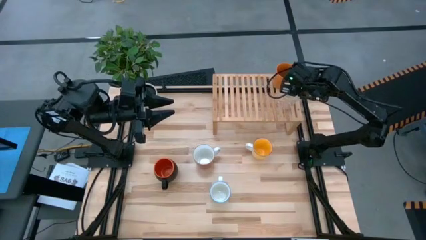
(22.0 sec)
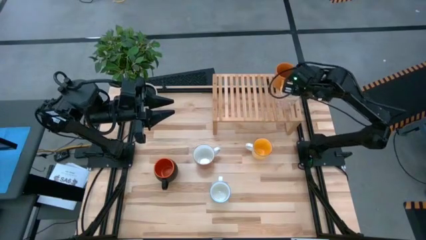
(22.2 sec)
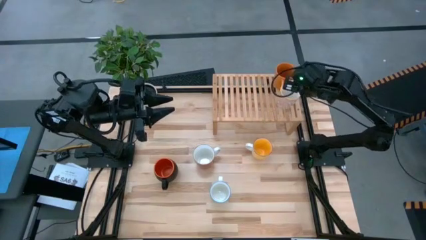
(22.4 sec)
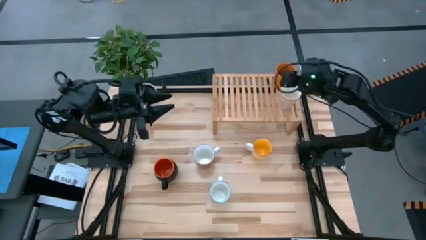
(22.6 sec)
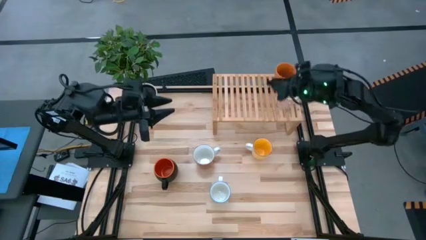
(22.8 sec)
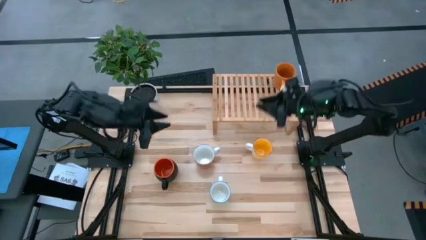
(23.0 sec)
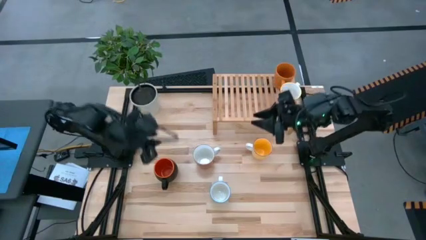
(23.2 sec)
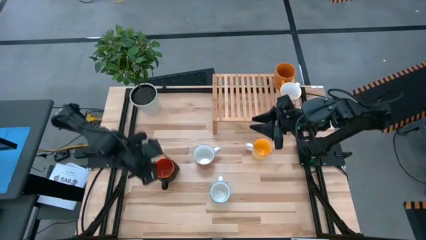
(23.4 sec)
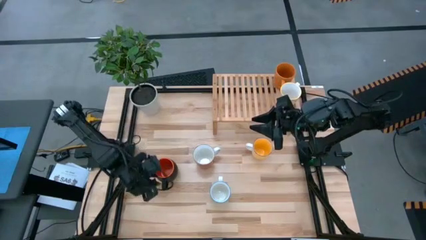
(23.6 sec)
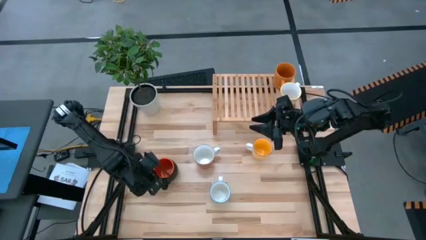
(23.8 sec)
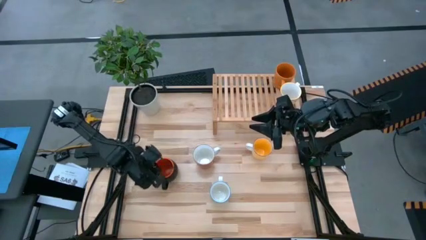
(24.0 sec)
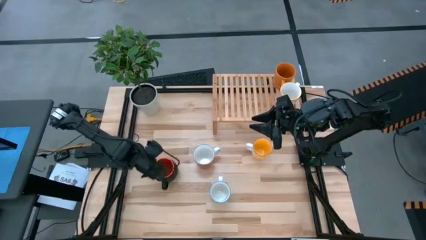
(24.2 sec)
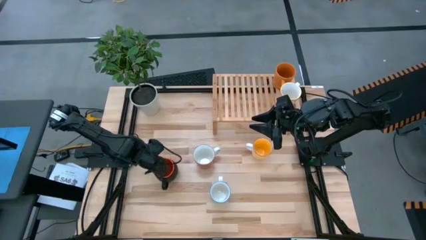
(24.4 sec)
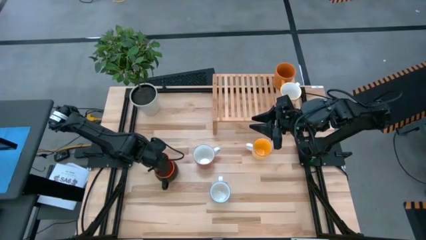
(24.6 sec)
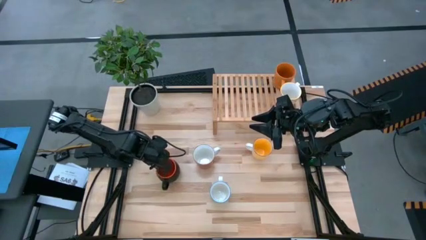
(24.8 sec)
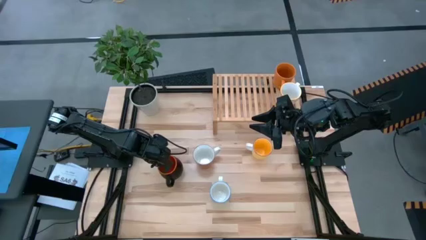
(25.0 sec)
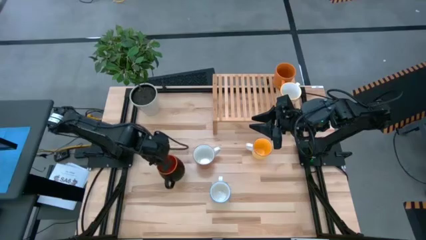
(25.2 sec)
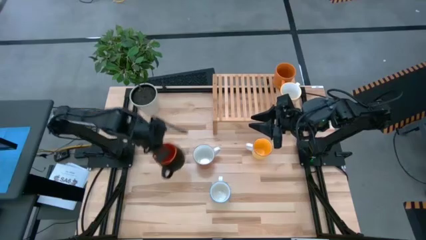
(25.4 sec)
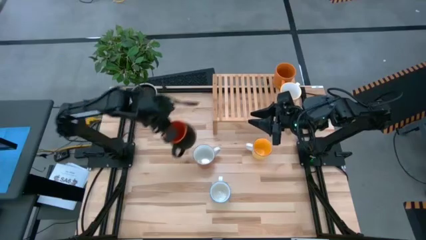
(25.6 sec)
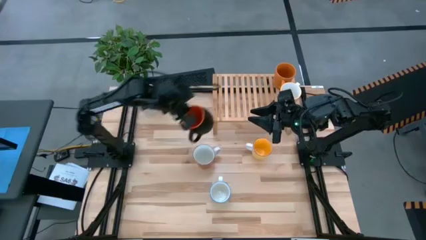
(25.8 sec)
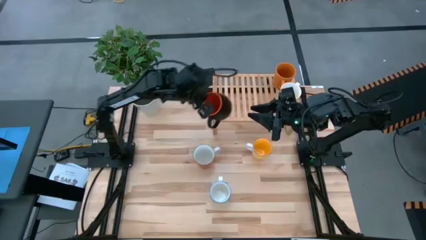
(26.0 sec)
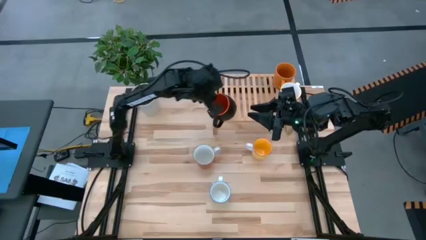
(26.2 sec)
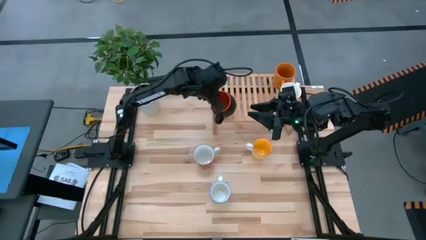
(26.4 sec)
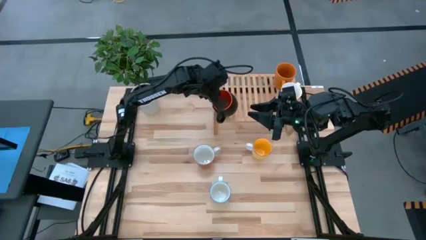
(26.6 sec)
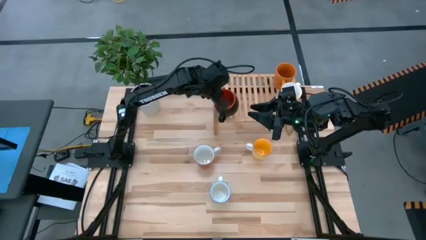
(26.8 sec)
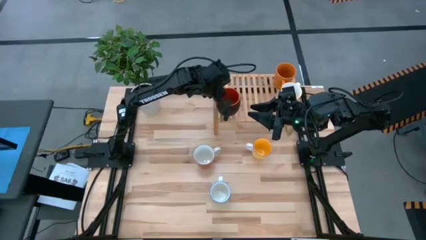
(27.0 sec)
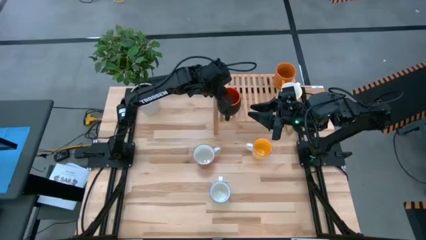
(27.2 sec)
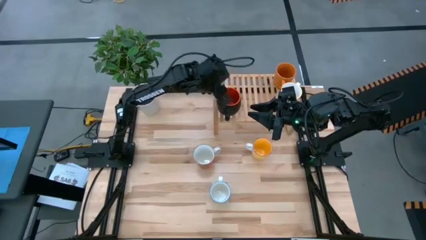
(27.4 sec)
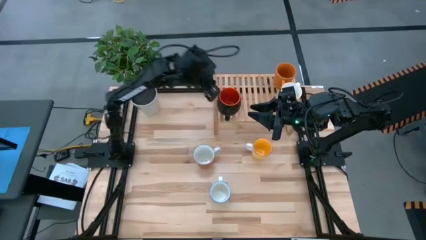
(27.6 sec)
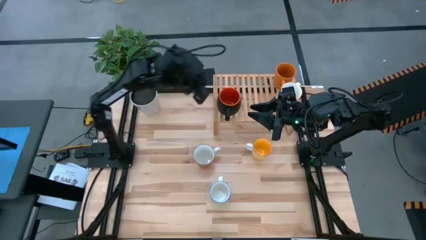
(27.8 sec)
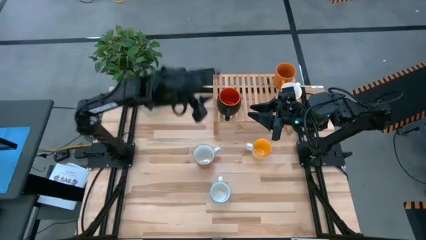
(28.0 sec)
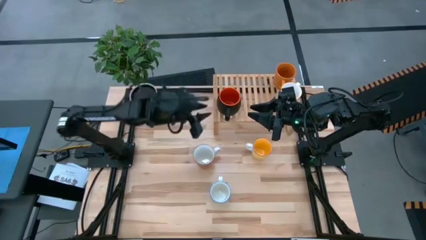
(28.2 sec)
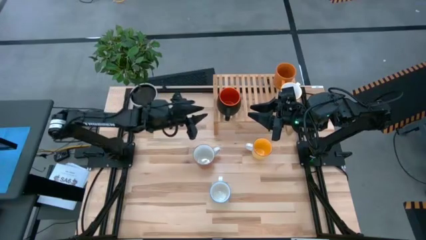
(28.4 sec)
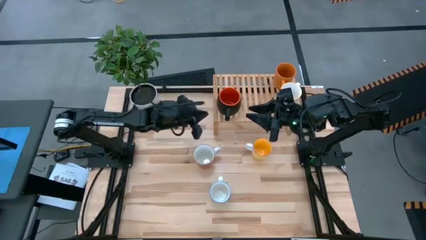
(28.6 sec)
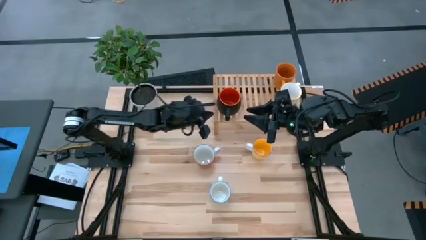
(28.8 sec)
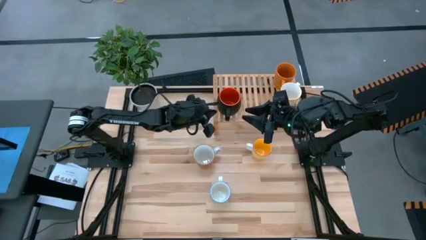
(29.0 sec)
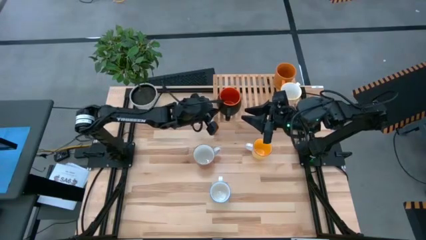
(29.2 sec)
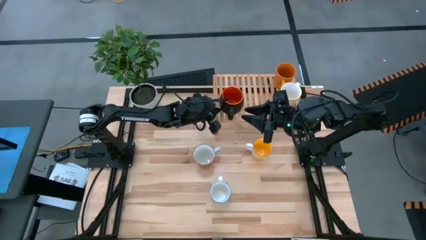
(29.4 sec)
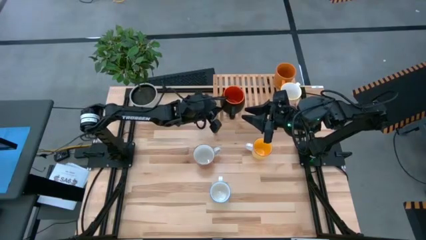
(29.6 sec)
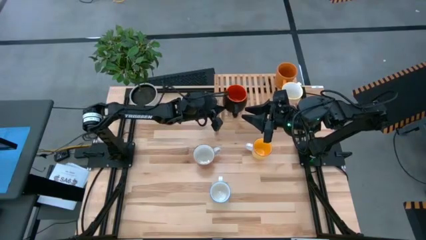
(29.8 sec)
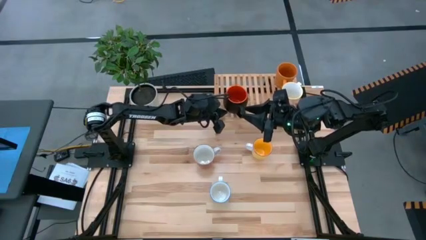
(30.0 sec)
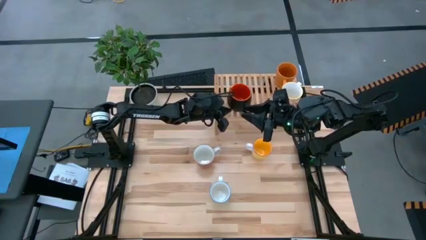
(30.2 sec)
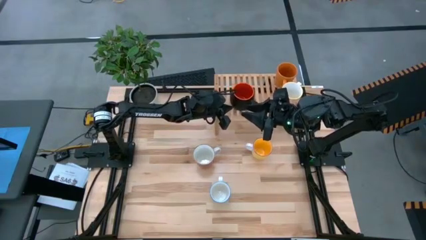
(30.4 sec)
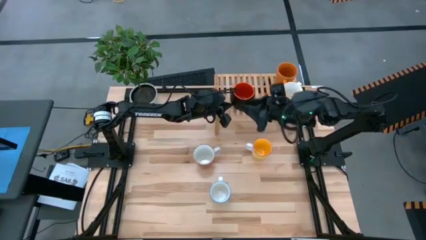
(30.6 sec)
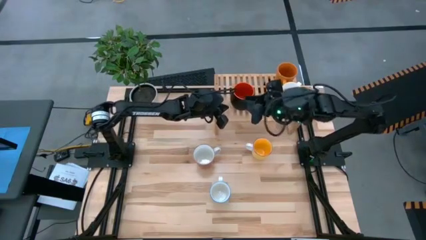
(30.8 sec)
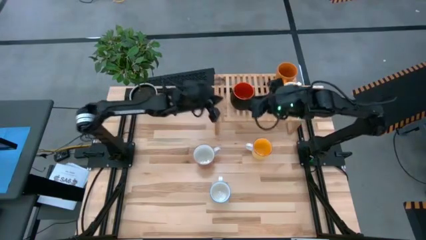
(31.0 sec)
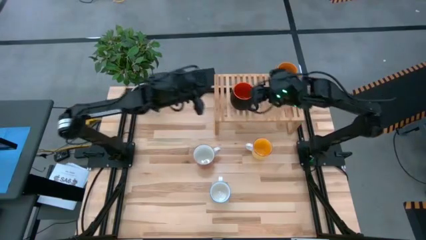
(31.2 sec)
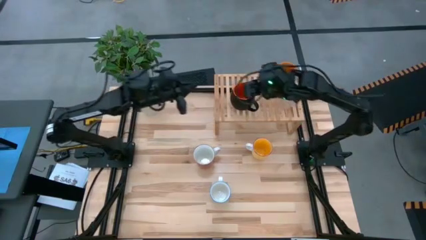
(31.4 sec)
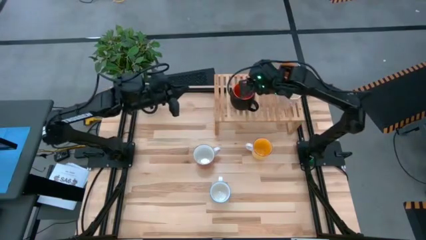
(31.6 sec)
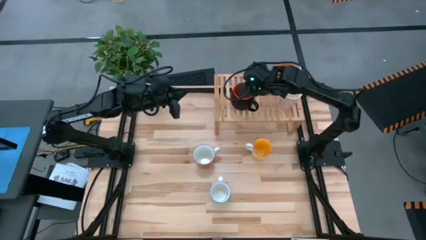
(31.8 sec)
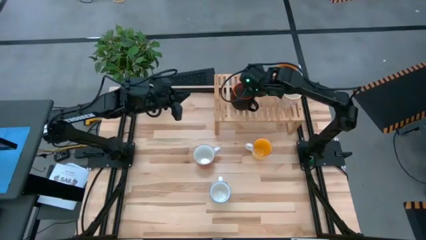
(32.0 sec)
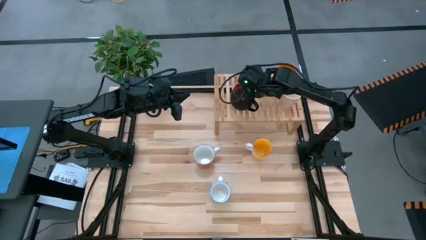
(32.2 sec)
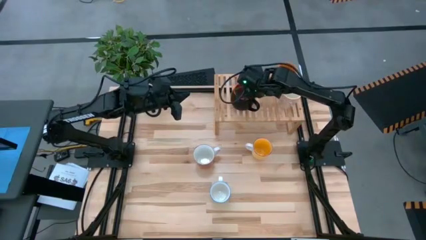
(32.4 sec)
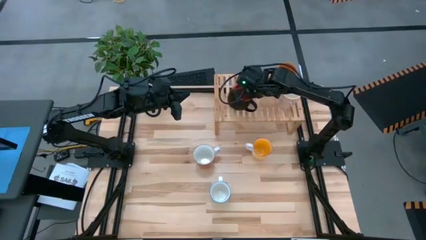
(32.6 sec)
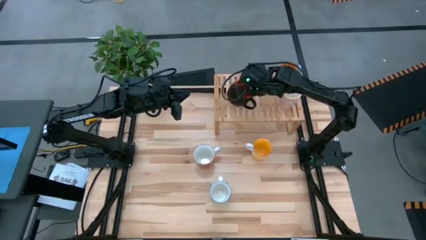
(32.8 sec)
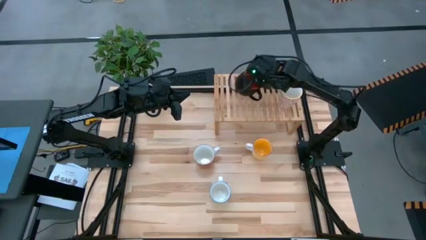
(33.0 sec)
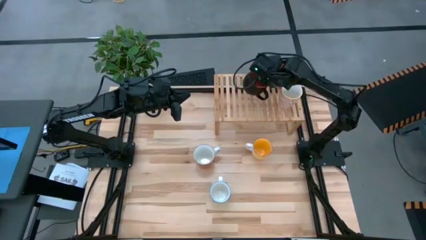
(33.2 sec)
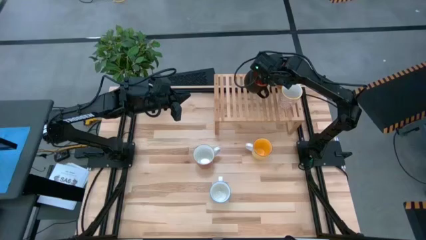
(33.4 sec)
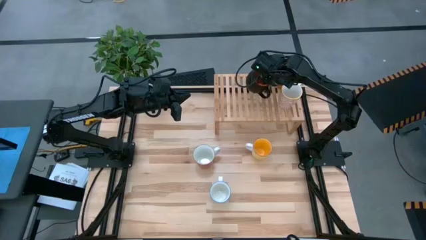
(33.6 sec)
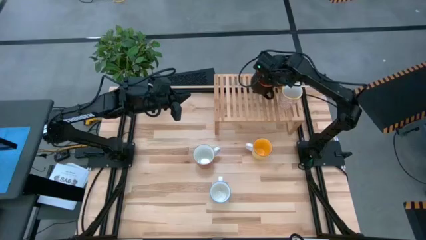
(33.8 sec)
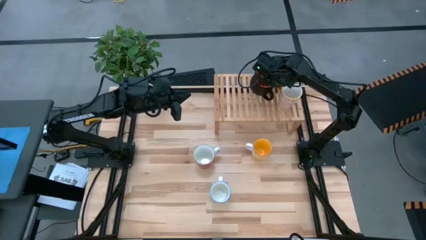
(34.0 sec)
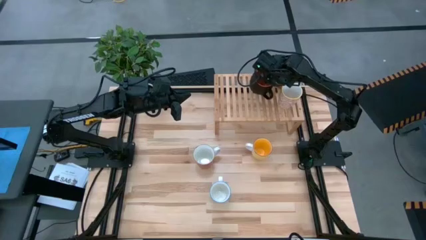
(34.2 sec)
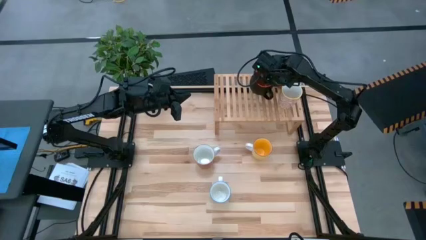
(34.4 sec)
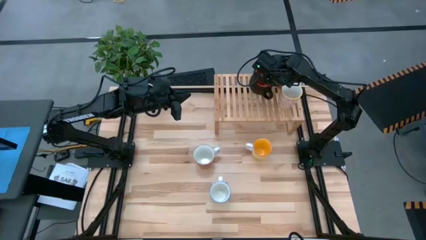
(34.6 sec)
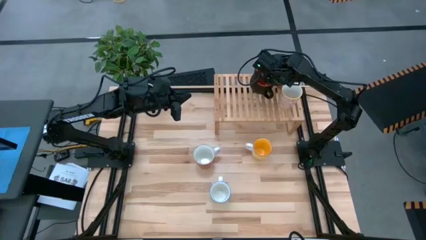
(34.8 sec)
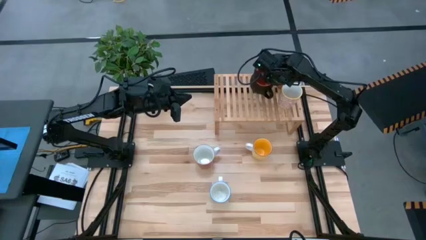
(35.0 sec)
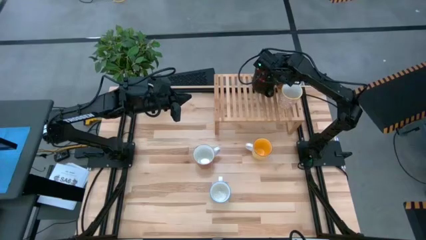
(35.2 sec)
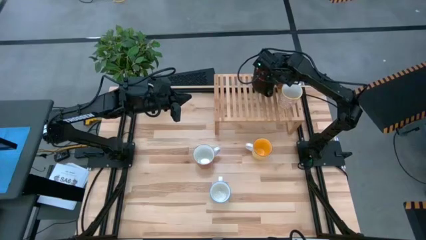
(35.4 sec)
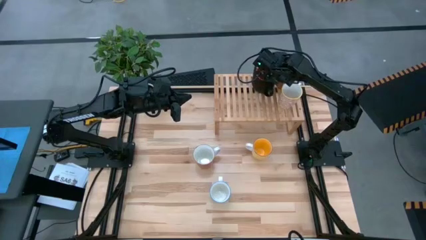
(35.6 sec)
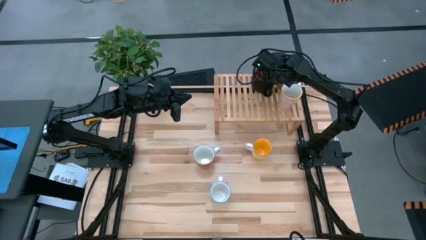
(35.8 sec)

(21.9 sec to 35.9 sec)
Task: Place coffee mugs
Put the black mug on the shelf
